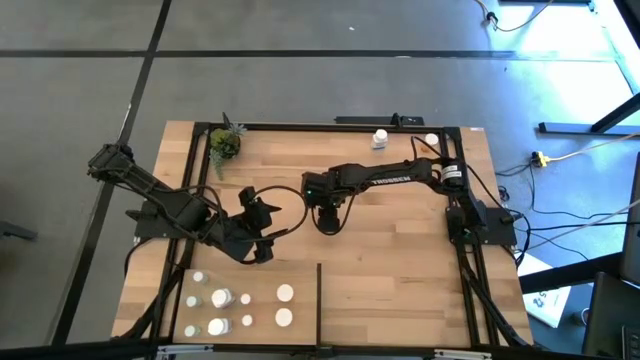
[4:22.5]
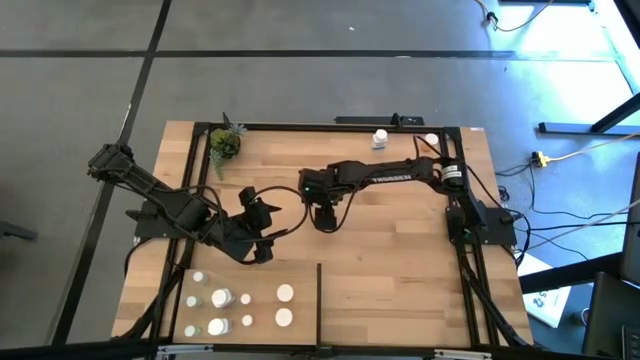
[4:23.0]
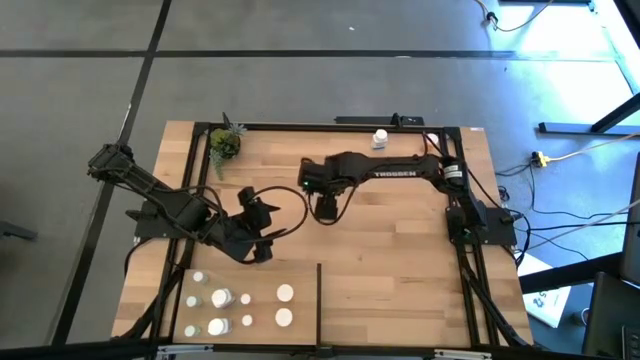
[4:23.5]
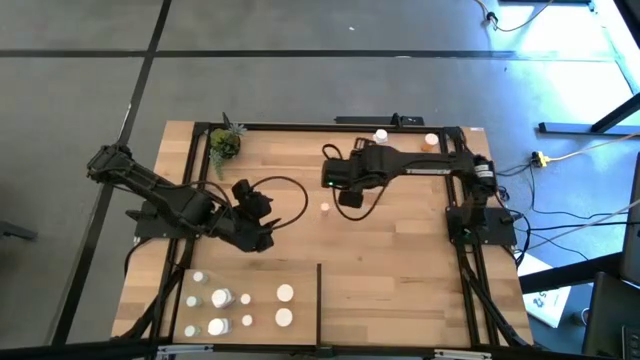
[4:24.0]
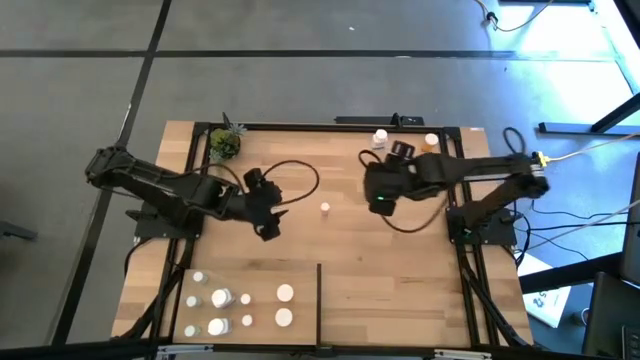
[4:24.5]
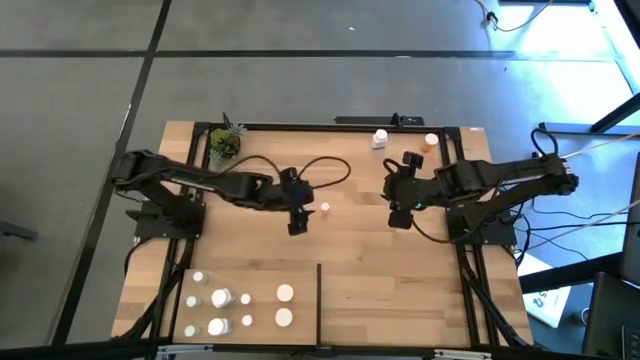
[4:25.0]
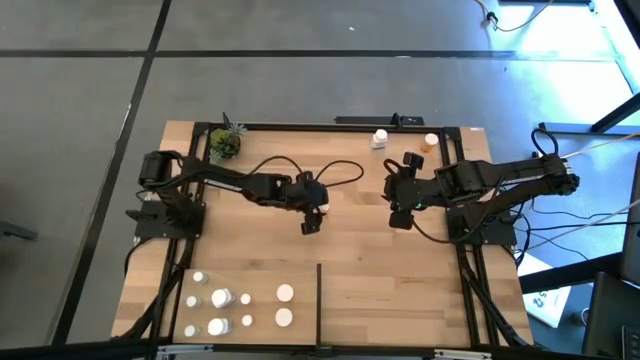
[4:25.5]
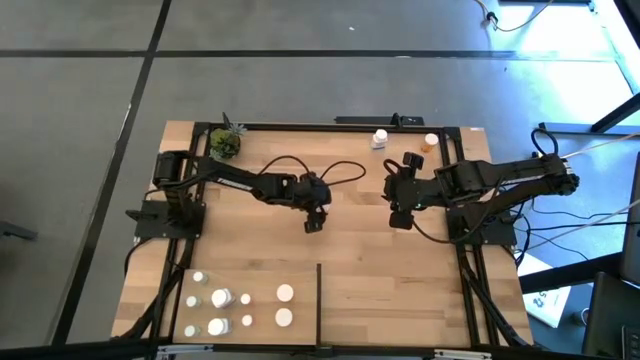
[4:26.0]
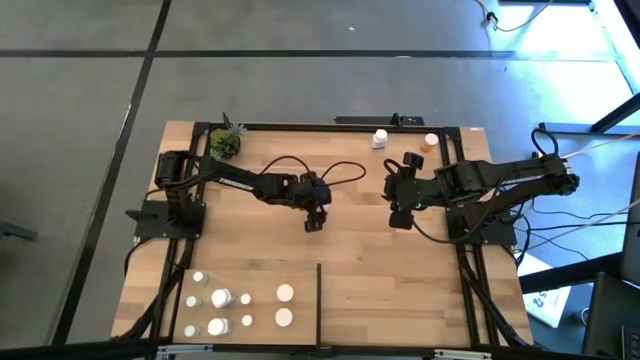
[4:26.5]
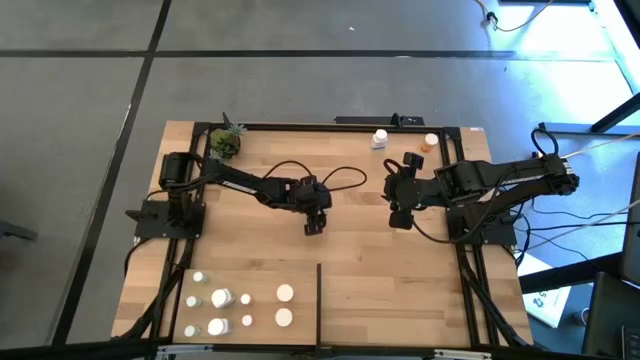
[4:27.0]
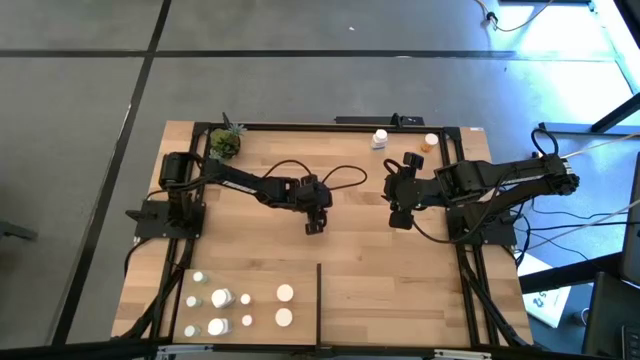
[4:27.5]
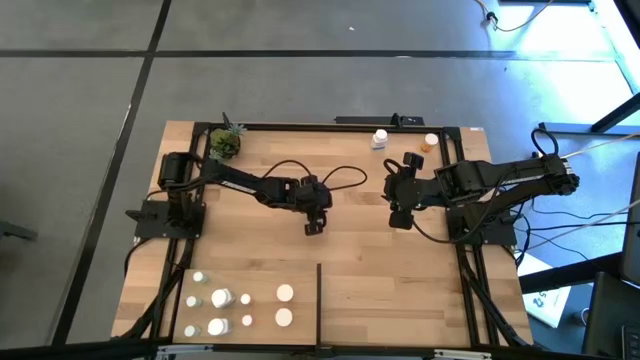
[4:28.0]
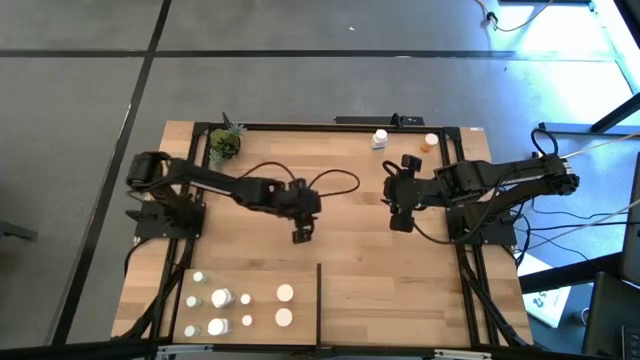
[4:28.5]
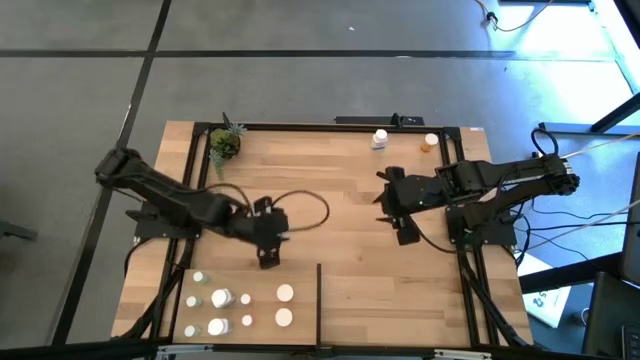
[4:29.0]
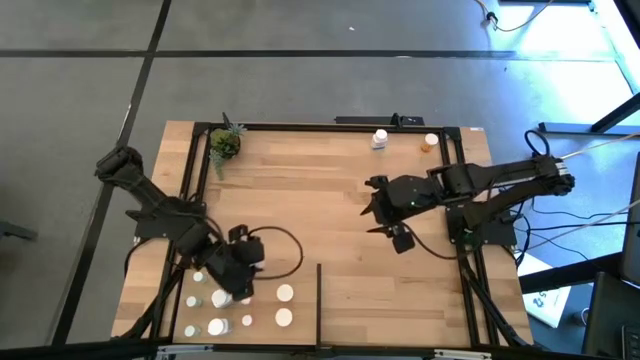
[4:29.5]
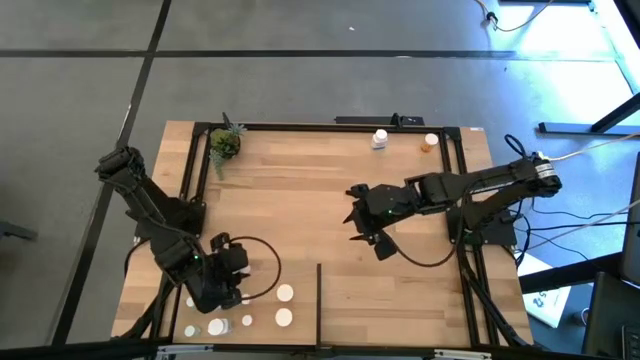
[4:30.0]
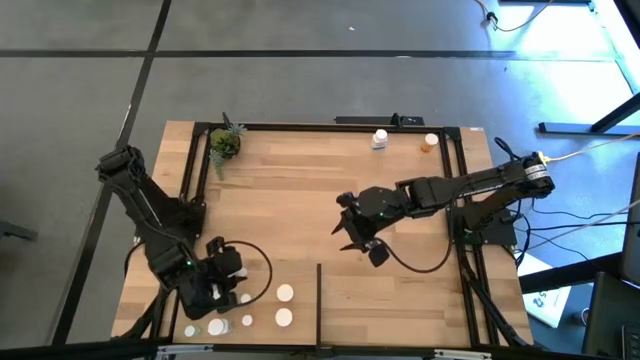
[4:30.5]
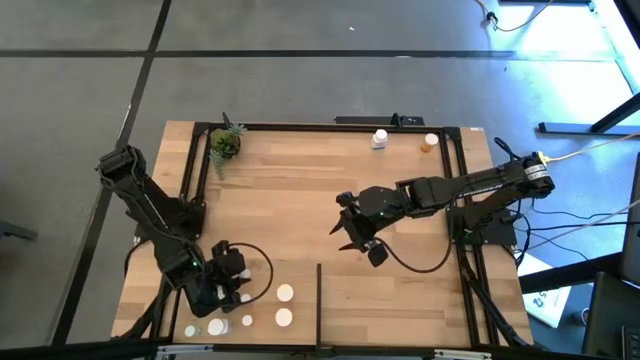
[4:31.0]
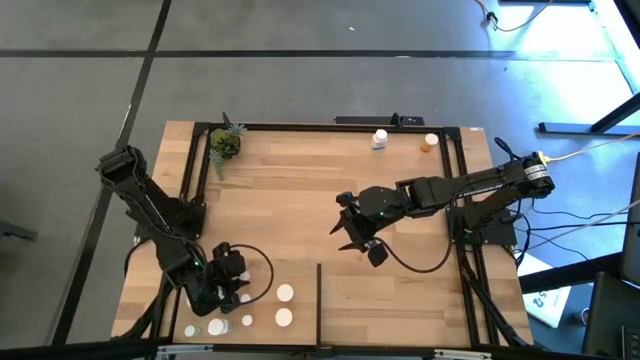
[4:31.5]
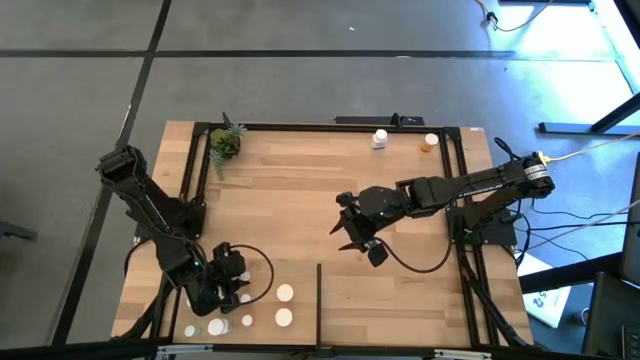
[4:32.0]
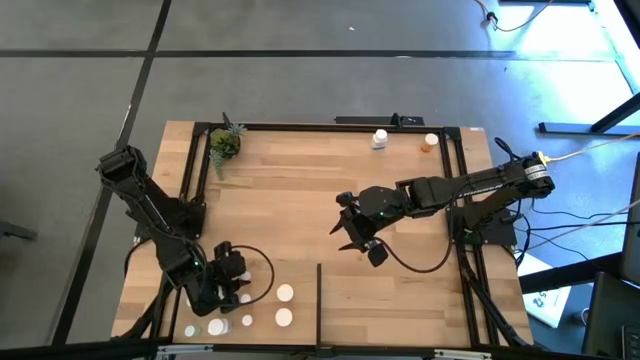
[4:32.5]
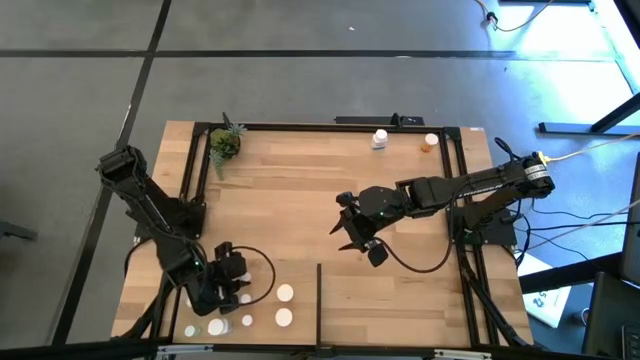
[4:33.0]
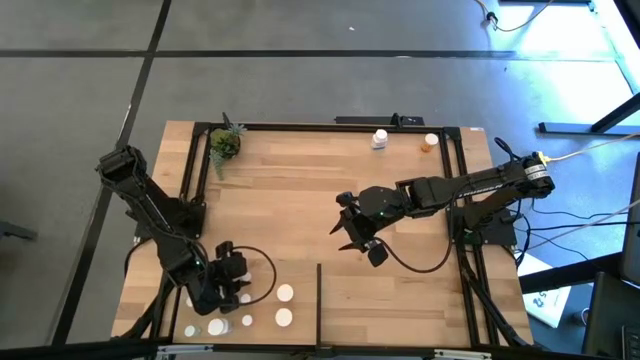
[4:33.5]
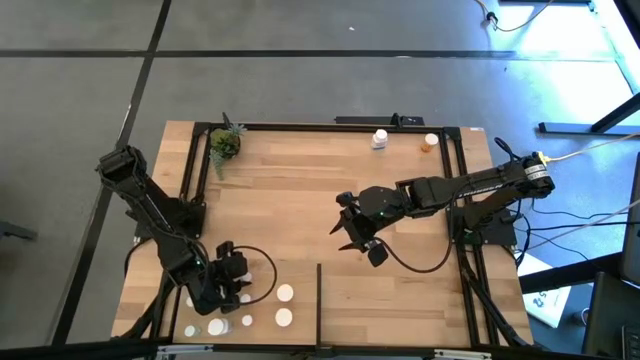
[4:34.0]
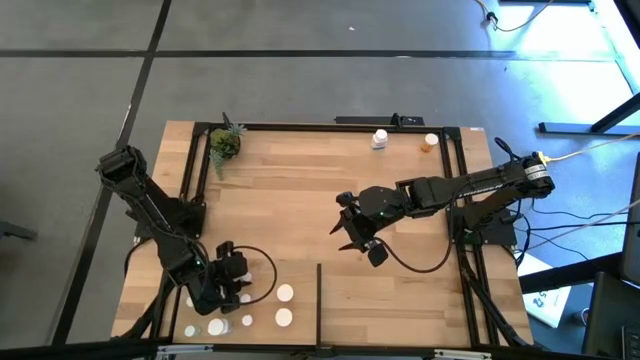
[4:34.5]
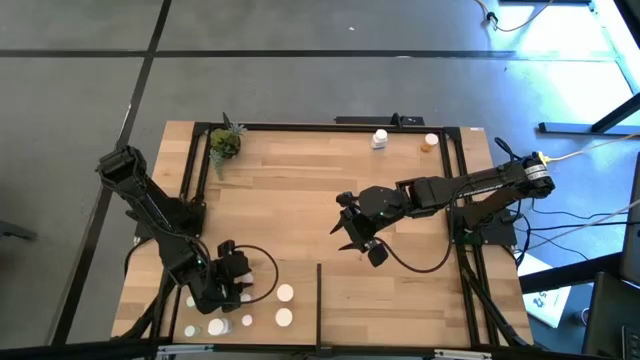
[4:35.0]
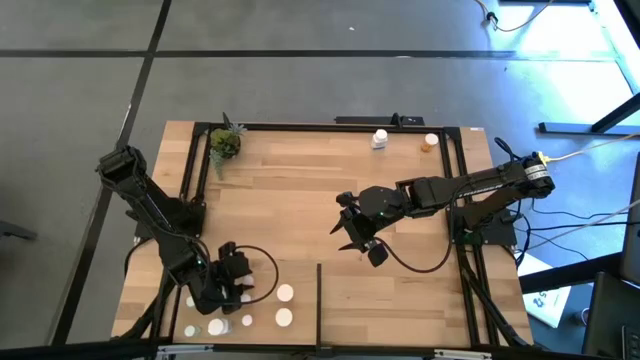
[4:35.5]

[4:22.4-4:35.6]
Task: Pick and place medicine bottles onto shelf by color
Put the pink pill bottle on the shelf aligned with the other pink pill bottle

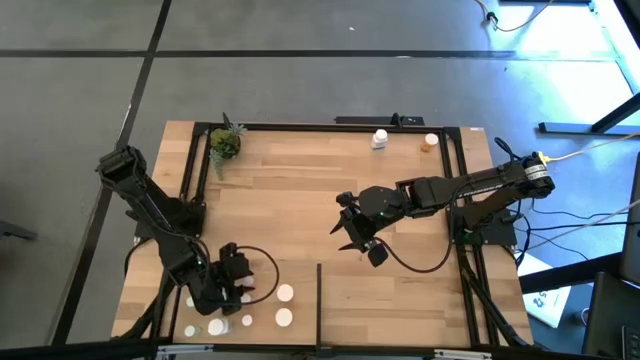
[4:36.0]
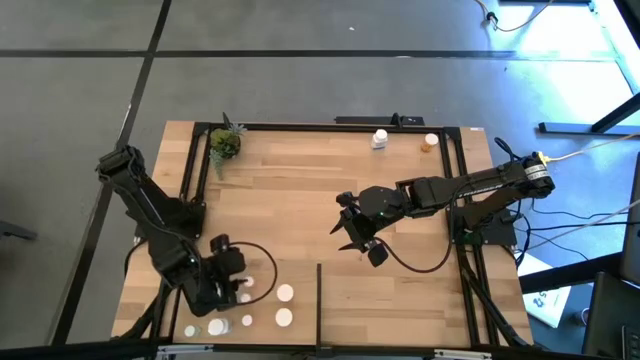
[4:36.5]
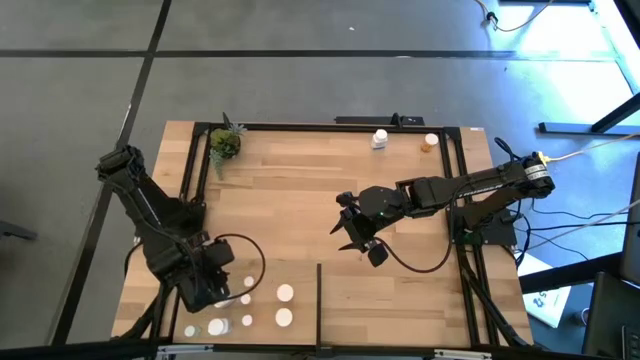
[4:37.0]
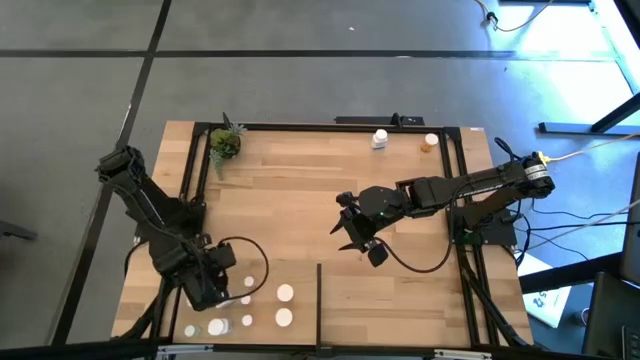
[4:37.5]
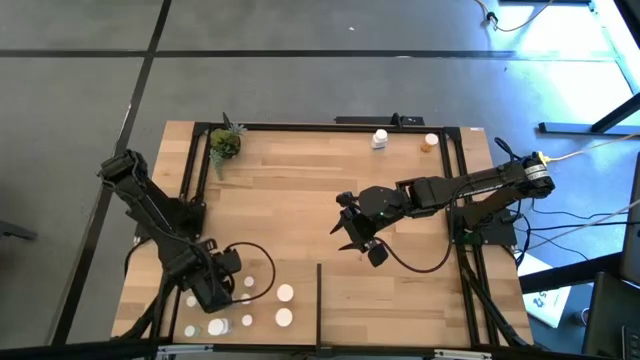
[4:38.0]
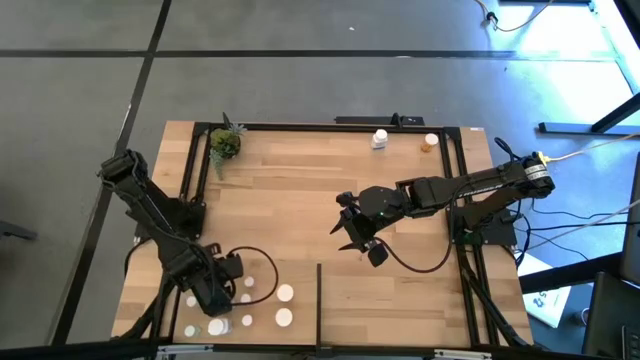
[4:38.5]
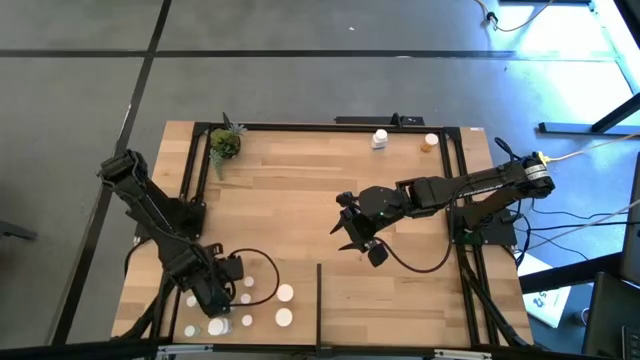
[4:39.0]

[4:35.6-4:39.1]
Adjust the white pill bottle on the shelf

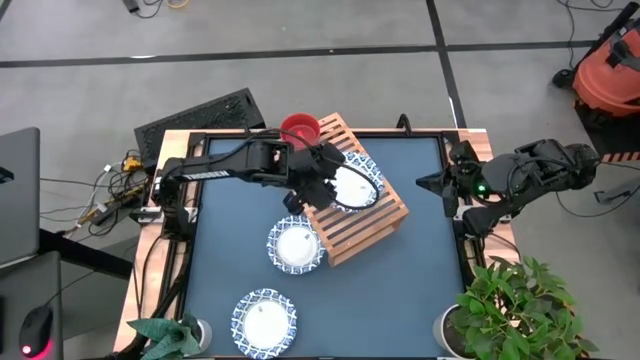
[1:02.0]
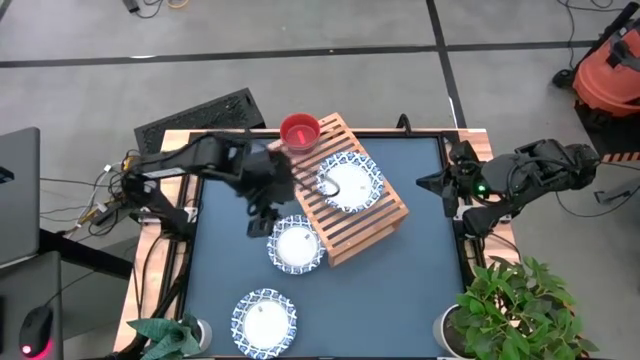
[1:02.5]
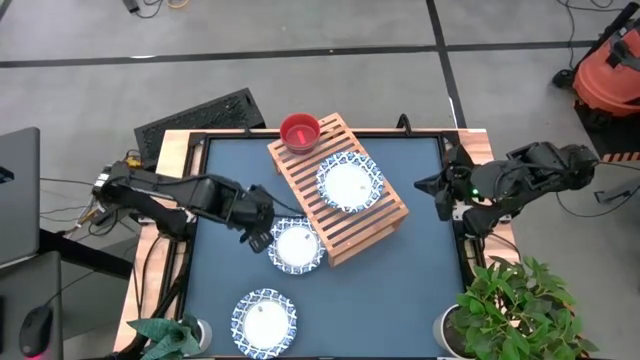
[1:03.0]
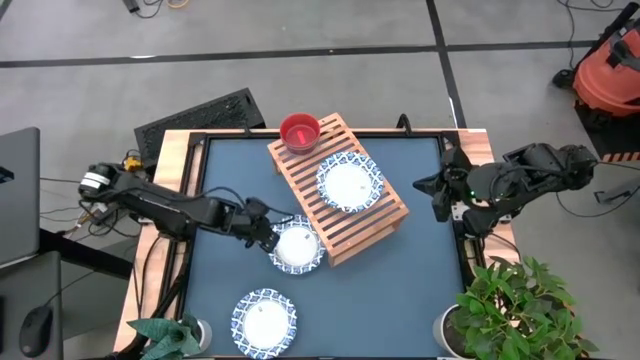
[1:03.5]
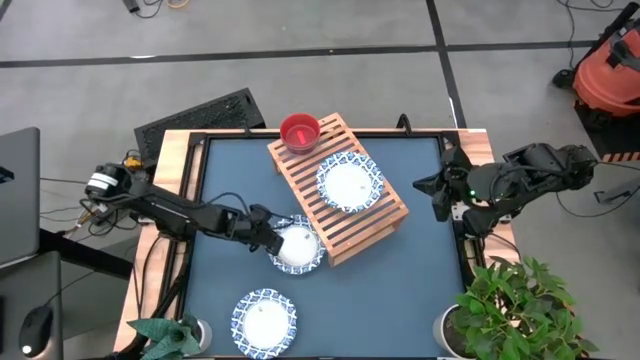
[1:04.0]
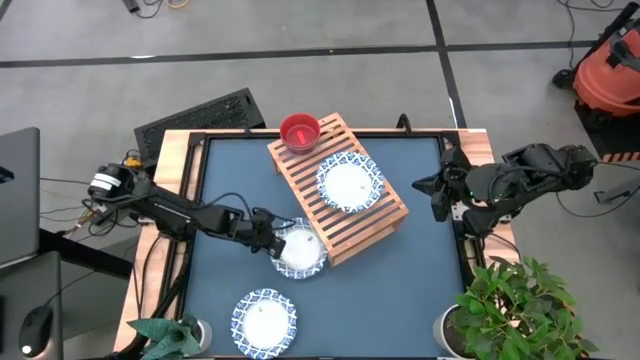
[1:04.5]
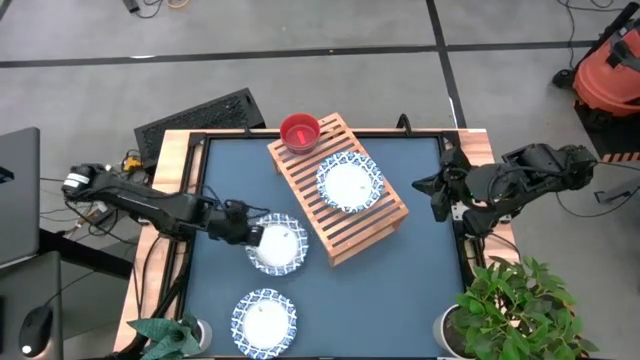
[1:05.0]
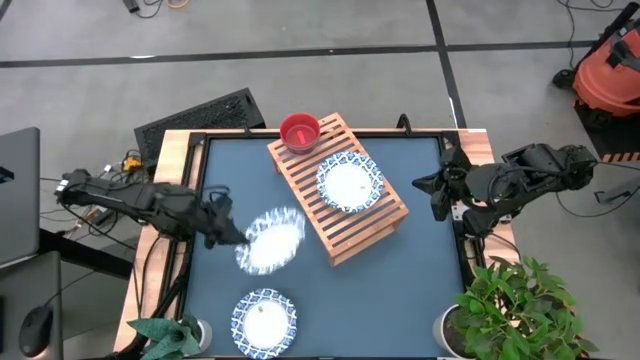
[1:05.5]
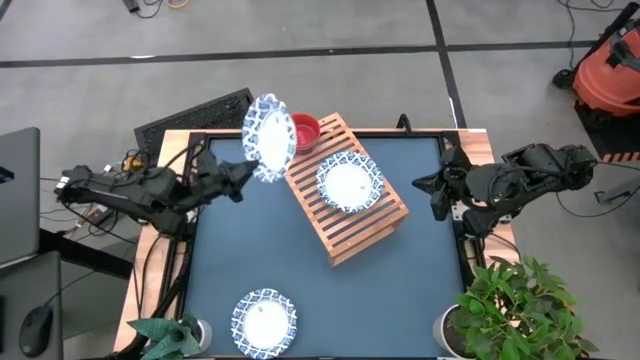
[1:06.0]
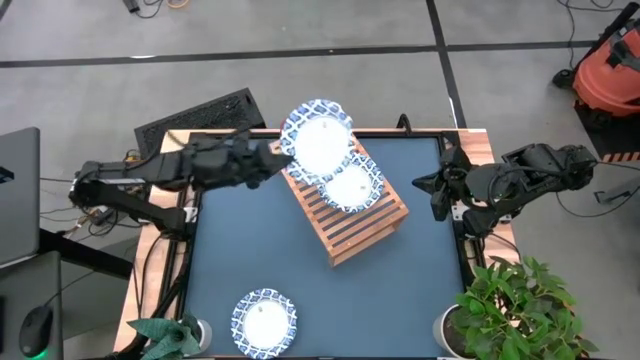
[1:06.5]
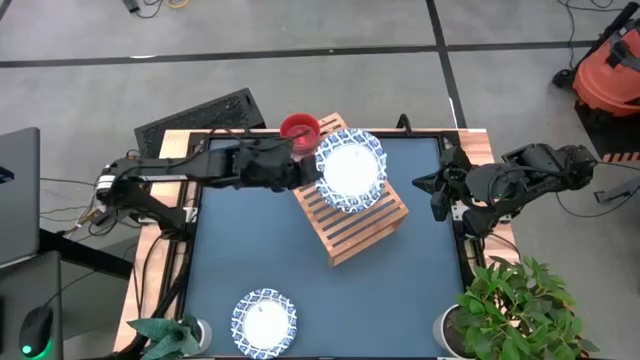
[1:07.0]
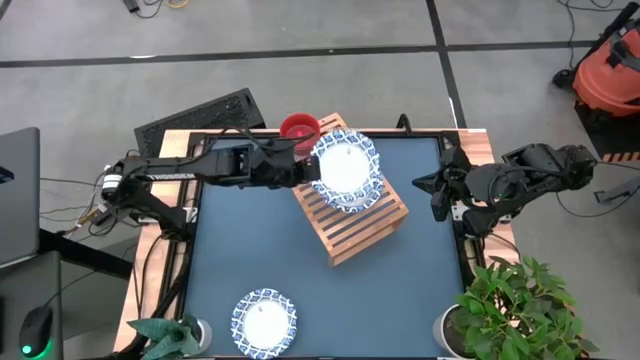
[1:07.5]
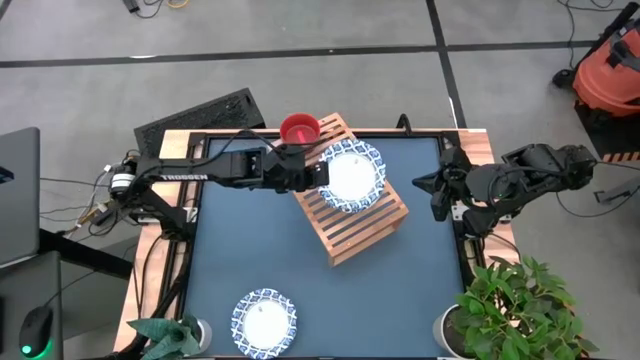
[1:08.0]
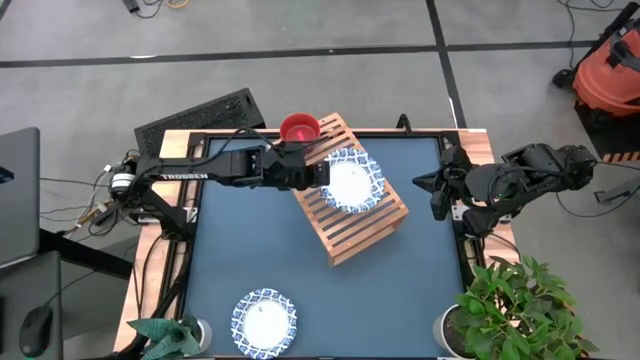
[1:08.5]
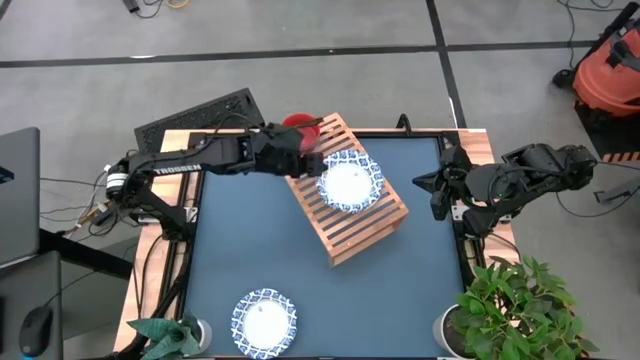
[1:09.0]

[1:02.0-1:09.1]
Task: Place and stack bowls onto a shelf
Stack the white bowl on top of the stacked white bowl
